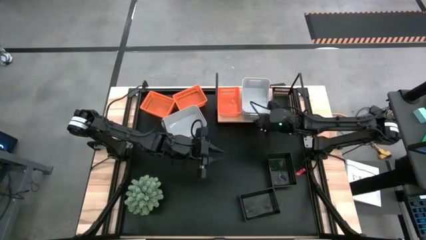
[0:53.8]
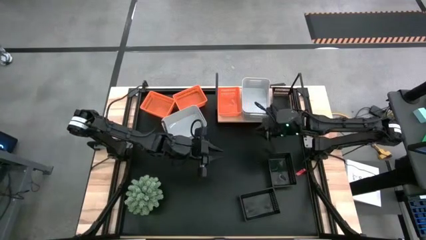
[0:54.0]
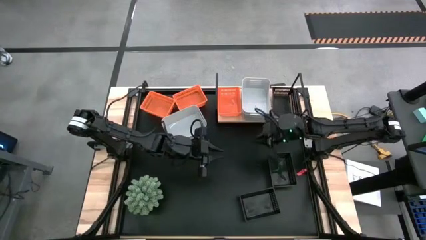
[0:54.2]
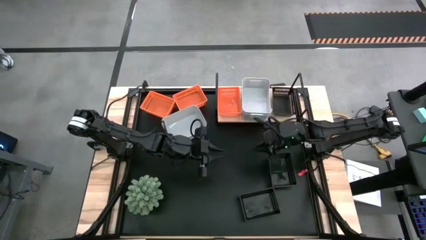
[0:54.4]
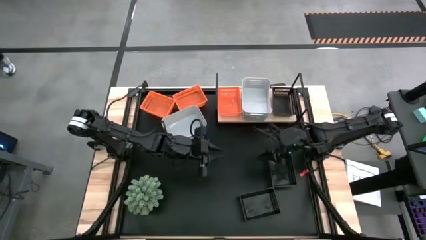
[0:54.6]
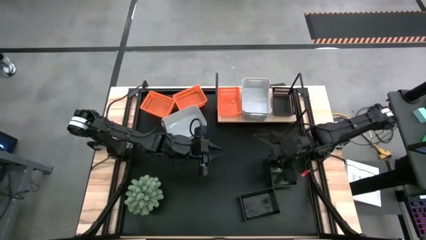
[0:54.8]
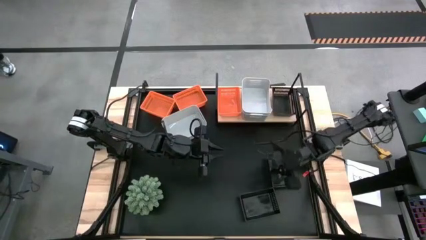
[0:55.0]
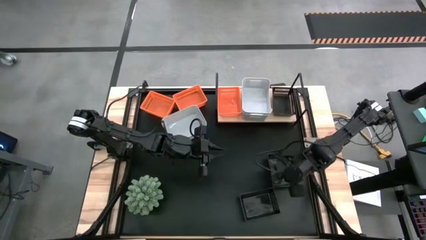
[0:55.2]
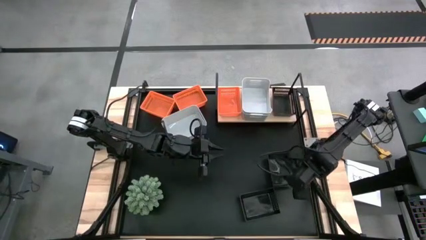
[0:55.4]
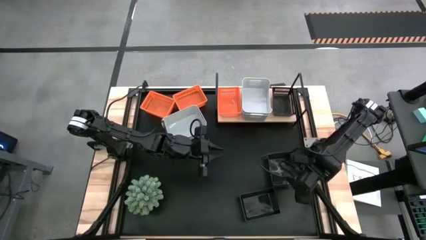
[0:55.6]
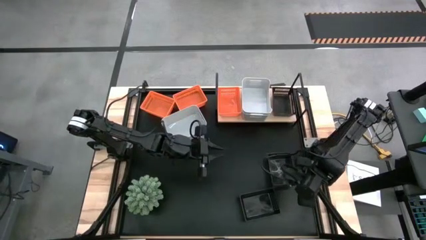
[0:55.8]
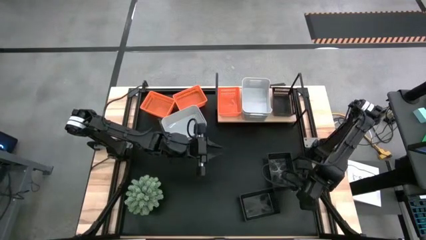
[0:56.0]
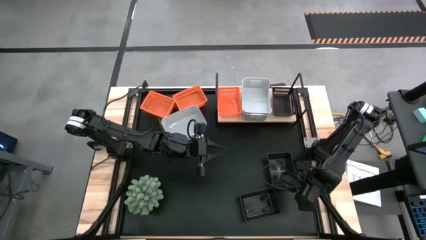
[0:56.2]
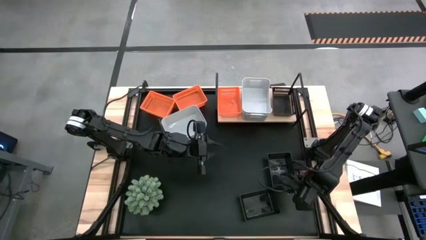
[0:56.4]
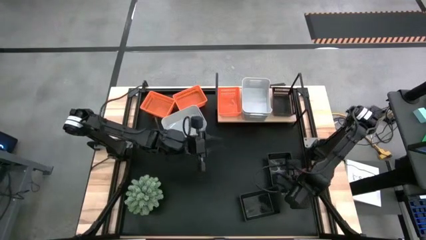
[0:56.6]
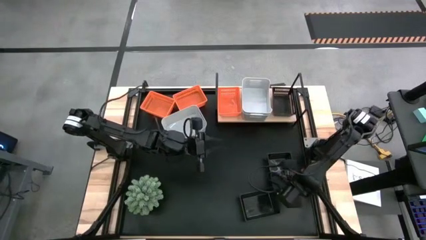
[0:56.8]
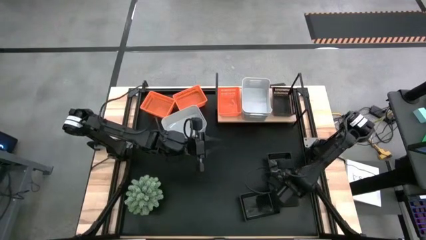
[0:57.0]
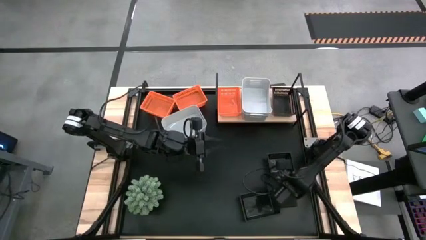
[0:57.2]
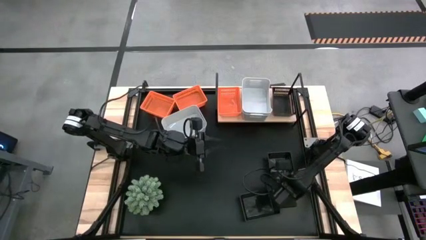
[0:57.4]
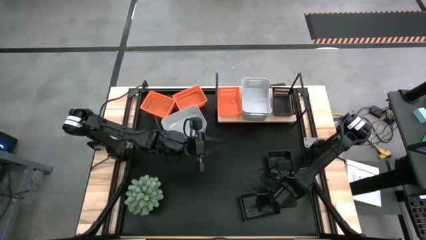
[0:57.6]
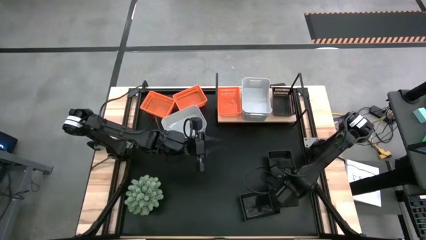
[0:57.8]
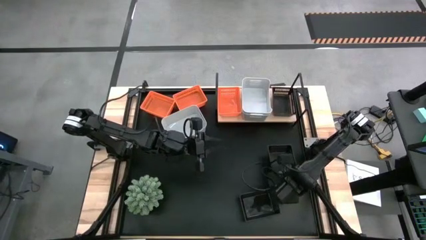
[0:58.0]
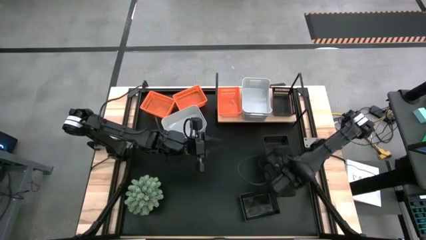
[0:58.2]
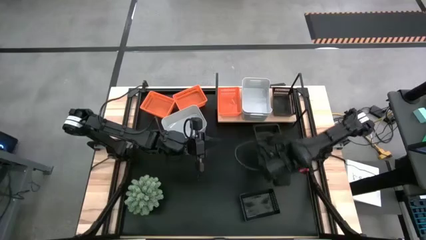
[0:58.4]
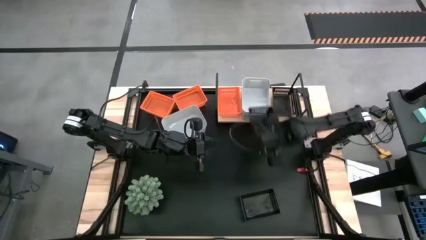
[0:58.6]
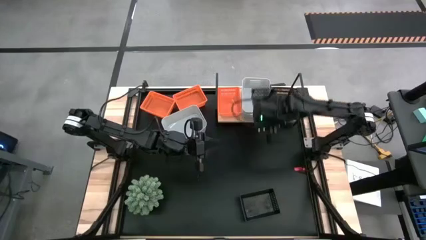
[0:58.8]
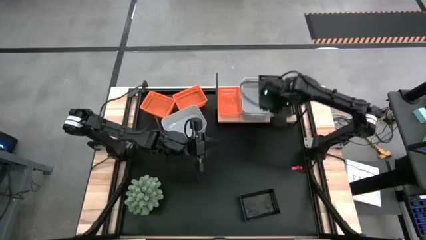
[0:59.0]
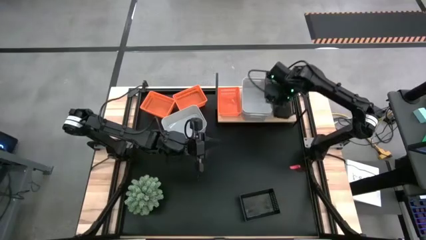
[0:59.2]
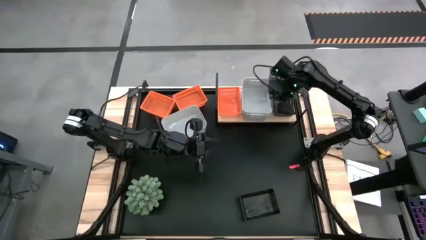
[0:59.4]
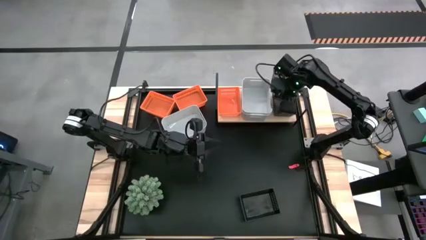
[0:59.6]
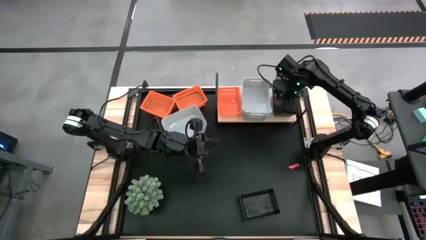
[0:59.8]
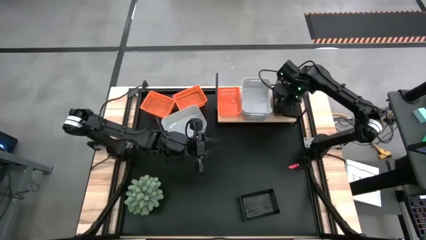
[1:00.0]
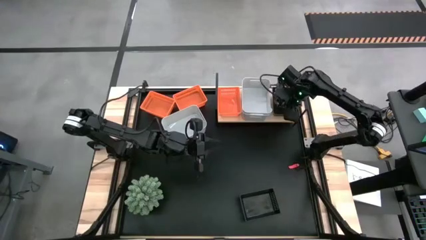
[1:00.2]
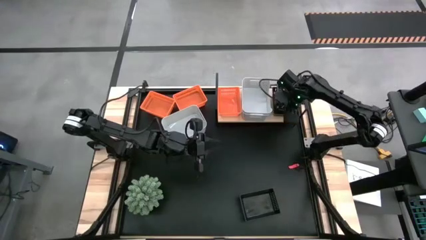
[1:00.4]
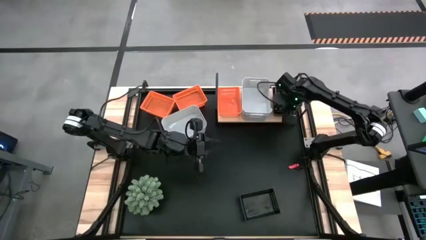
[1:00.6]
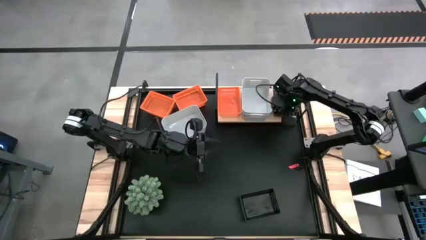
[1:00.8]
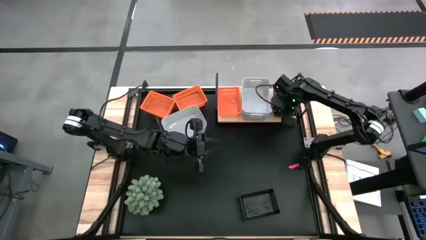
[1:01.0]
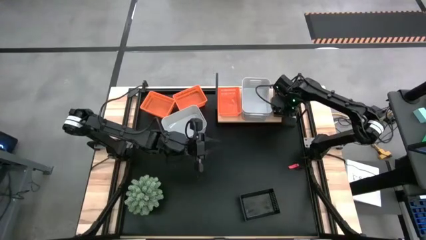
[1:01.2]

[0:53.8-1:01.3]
Task: Stack baskets on shelf by color
Stack the top black bin on top of the black bin on the shelf

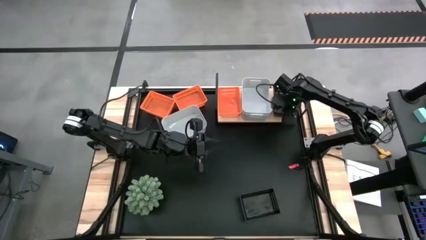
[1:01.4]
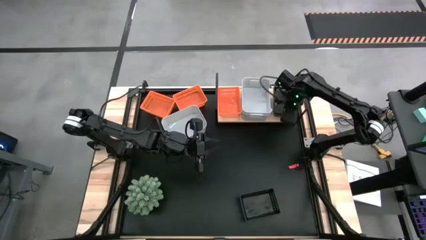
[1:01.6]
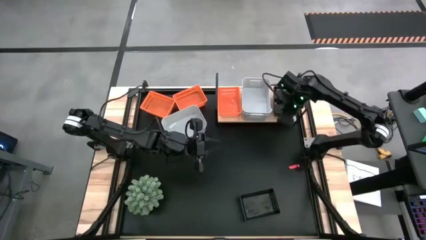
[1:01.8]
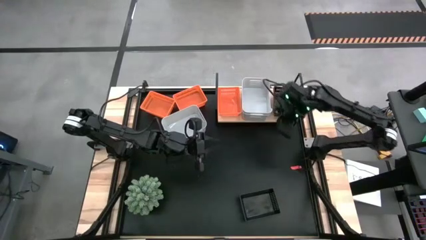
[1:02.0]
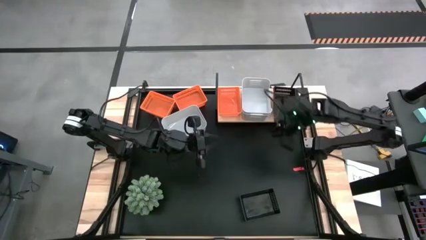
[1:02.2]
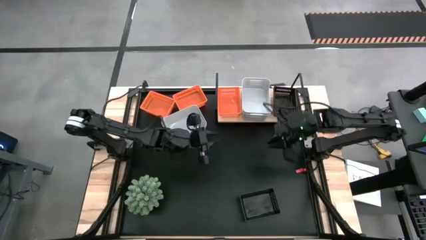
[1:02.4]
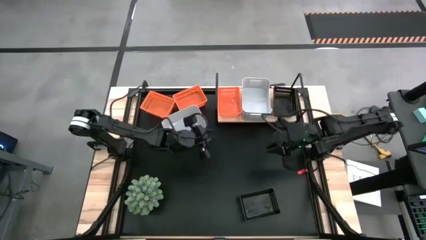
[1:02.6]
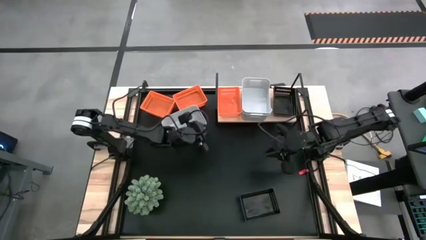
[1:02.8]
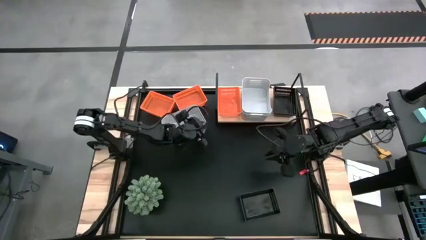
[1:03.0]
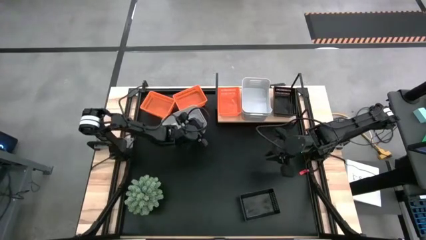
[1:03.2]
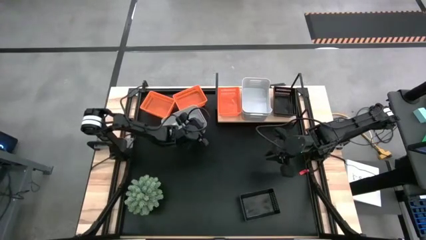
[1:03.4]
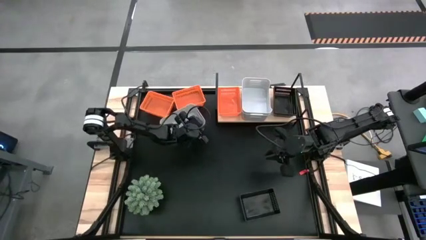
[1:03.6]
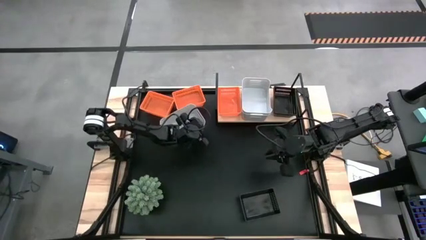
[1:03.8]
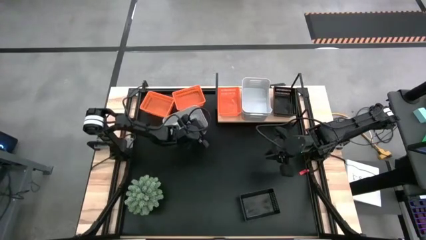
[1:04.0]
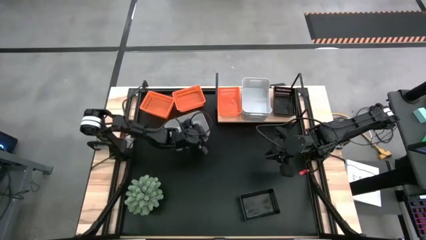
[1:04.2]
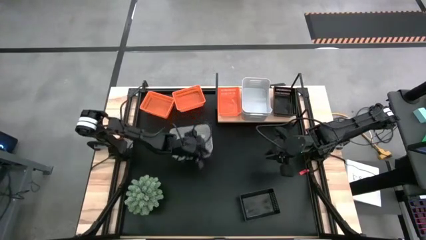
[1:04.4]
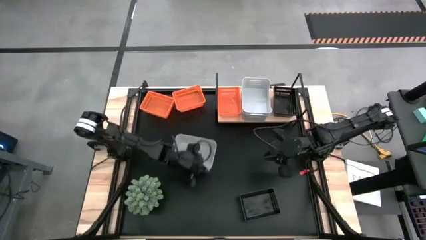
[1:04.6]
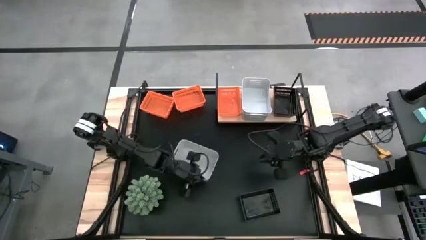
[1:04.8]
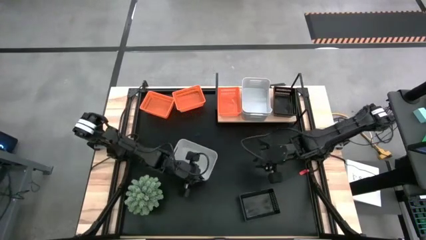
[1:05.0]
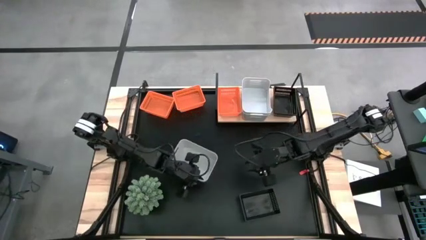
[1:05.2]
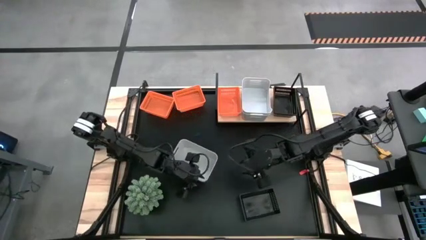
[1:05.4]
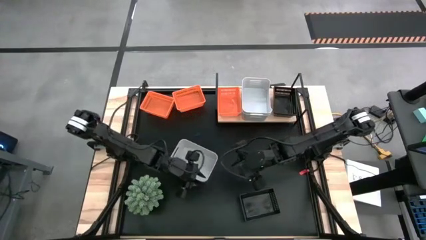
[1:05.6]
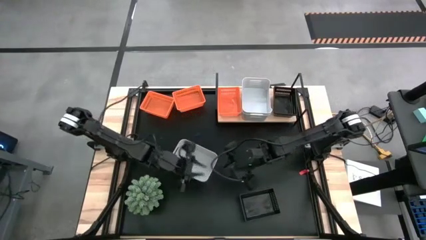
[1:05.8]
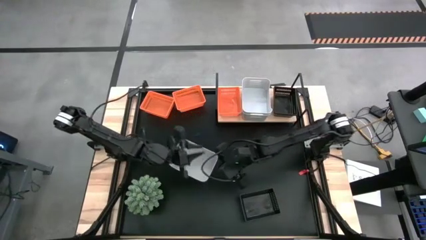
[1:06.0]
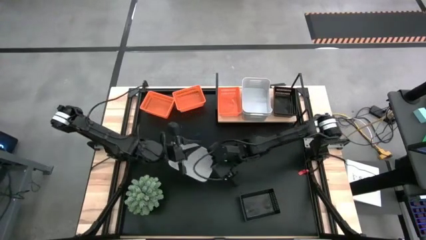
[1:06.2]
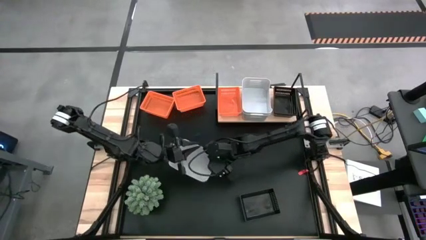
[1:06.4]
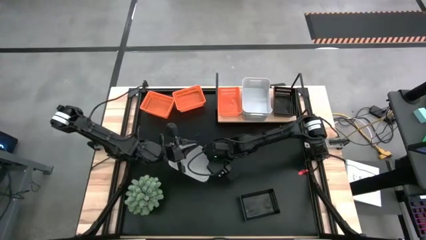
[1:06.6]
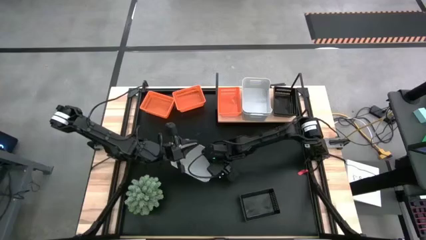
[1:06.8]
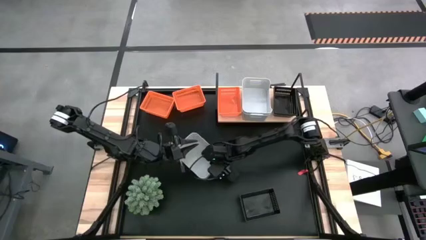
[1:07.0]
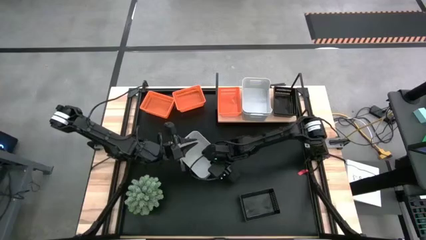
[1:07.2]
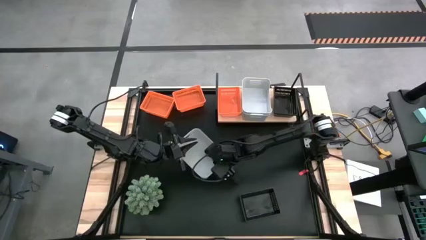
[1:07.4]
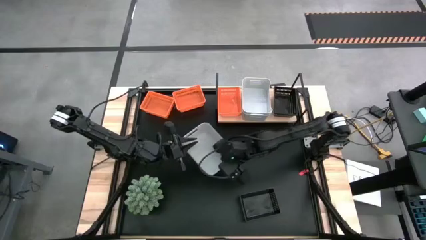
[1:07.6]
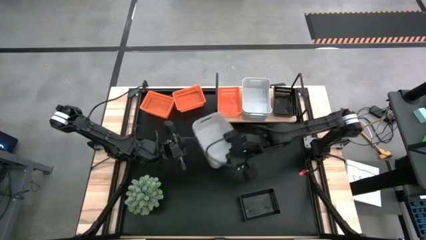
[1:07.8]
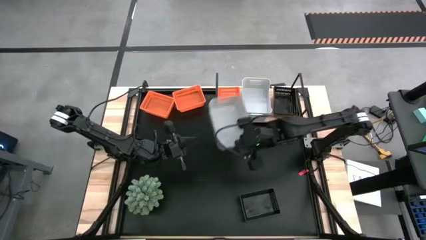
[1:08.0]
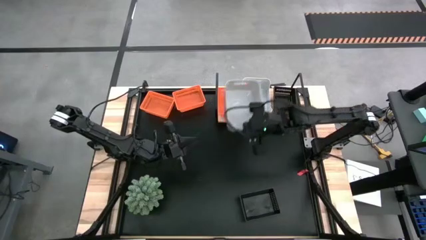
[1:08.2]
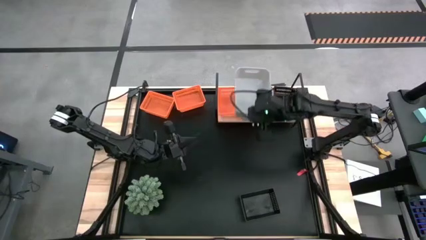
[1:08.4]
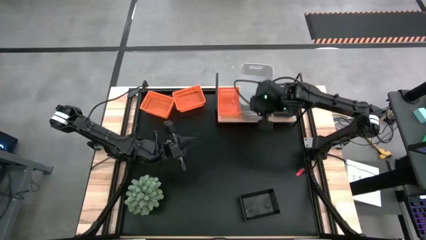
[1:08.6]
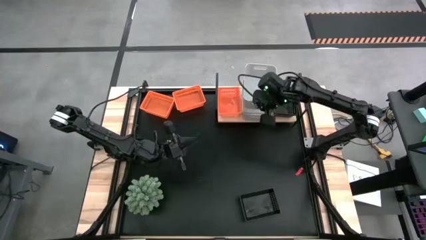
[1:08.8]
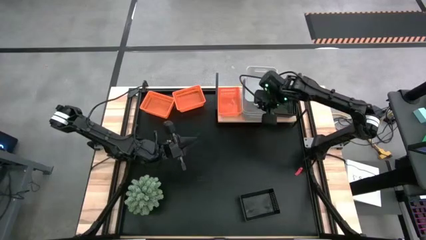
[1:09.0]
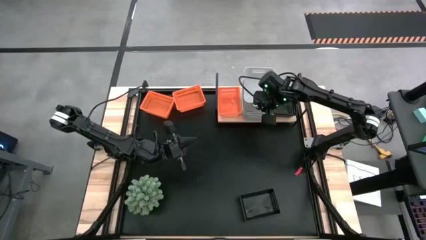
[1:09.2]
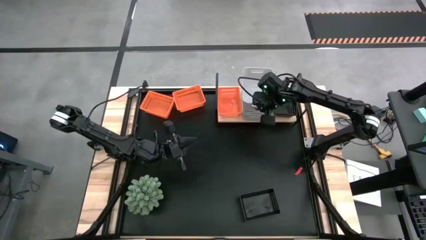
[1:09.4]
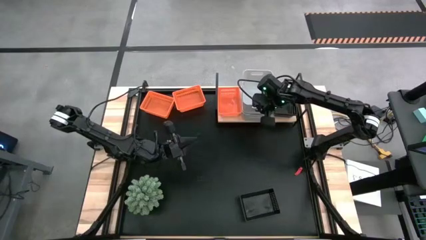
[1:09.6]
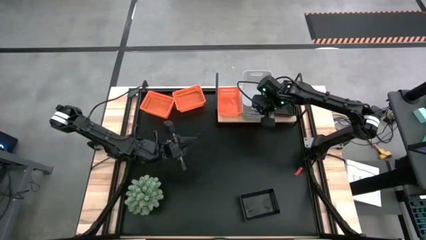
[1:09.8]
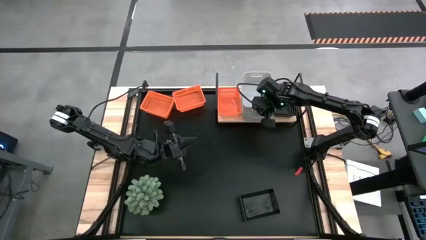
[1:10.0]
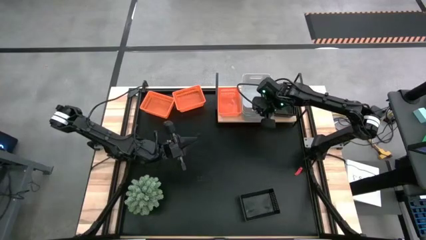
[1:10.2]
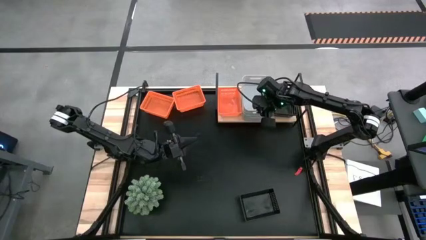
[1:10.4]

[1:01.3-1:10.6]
Stack the white bin on top of the white bin on the shelf
